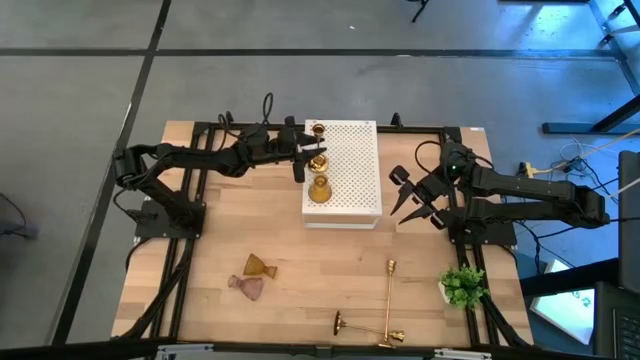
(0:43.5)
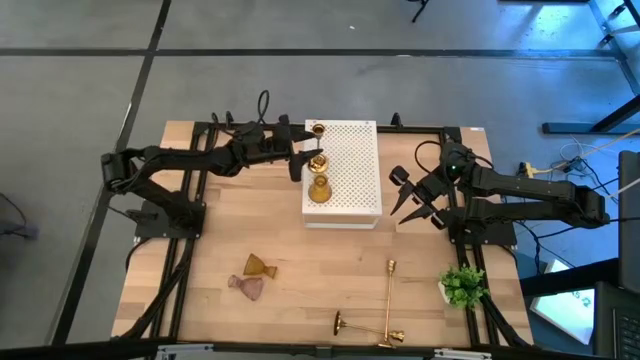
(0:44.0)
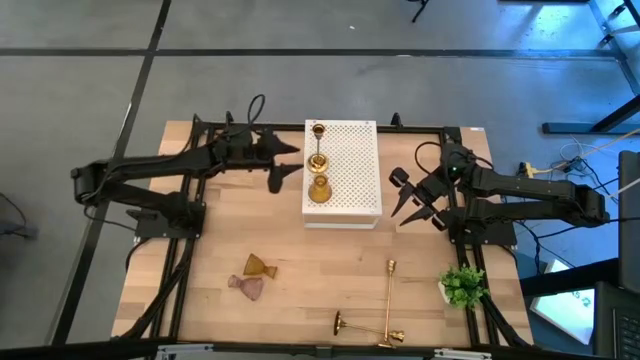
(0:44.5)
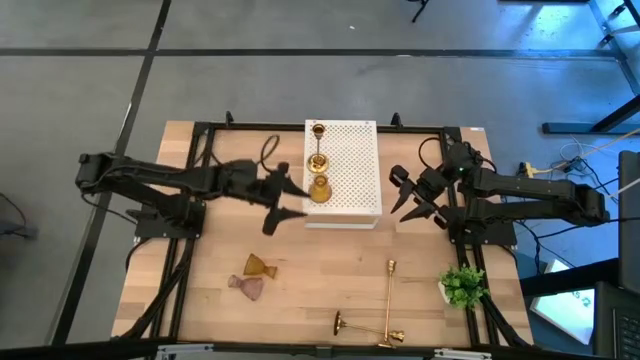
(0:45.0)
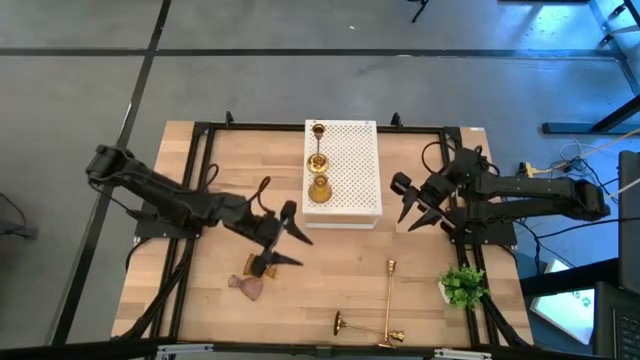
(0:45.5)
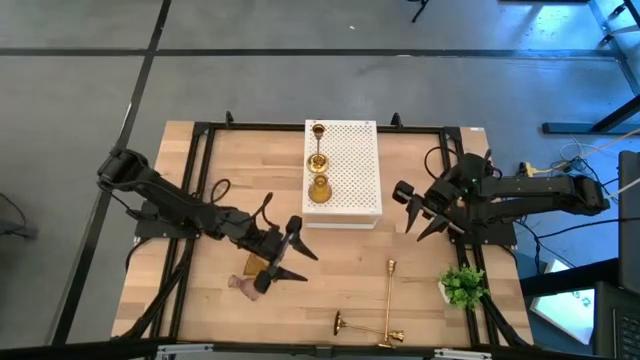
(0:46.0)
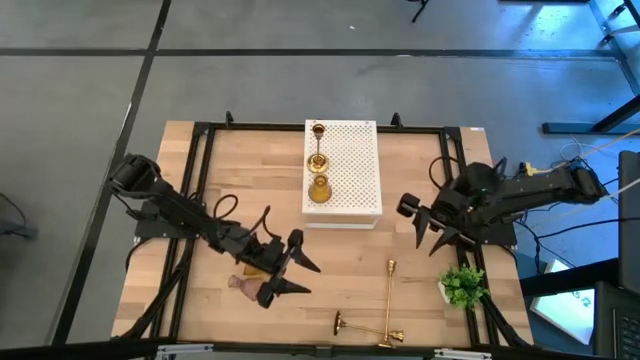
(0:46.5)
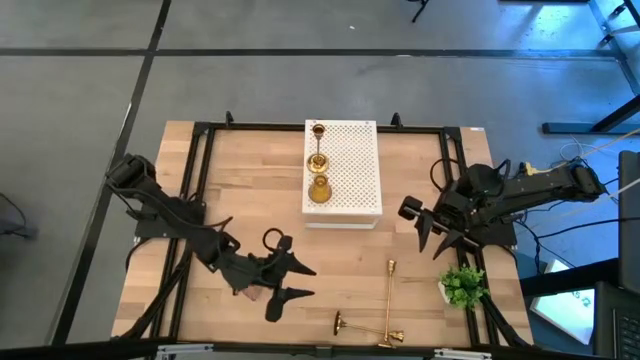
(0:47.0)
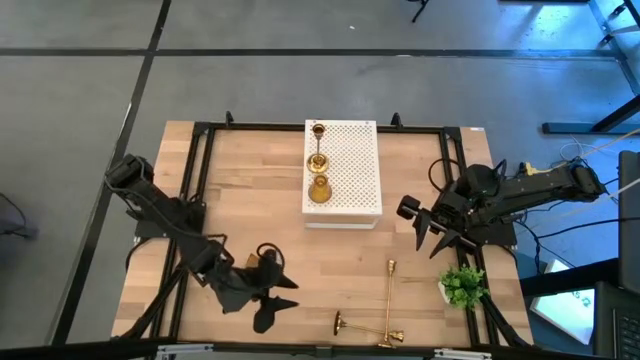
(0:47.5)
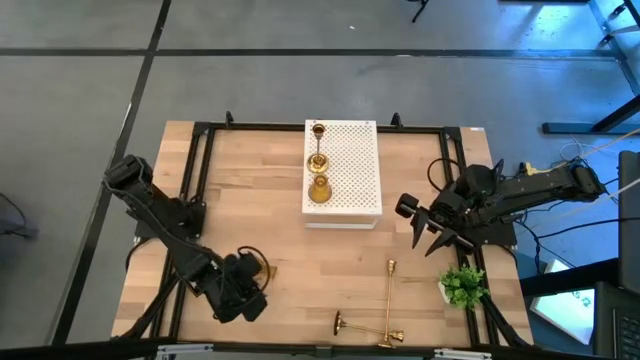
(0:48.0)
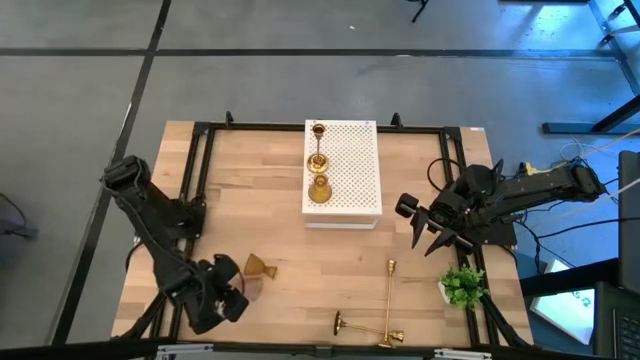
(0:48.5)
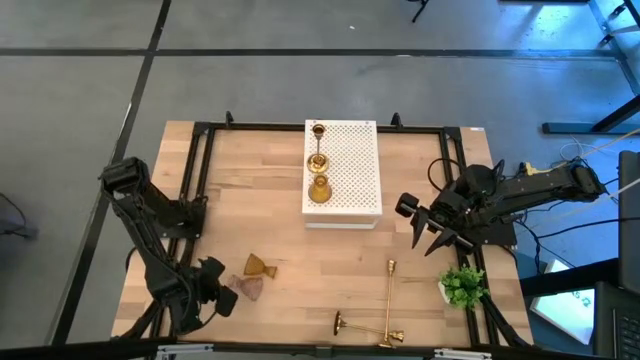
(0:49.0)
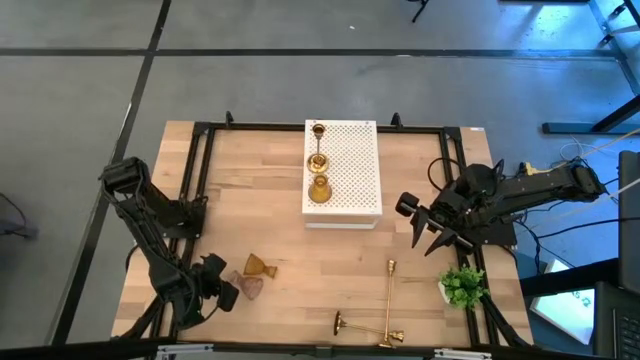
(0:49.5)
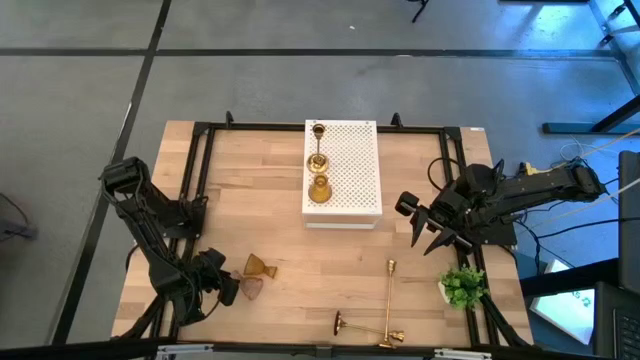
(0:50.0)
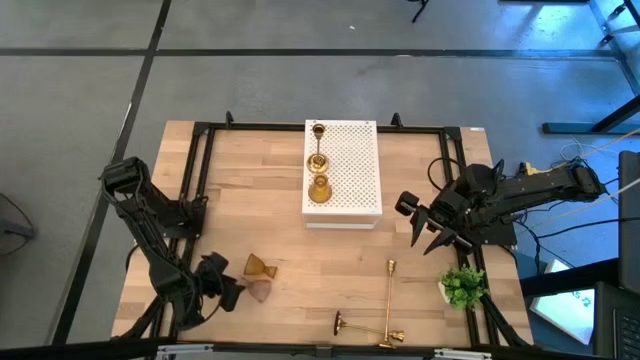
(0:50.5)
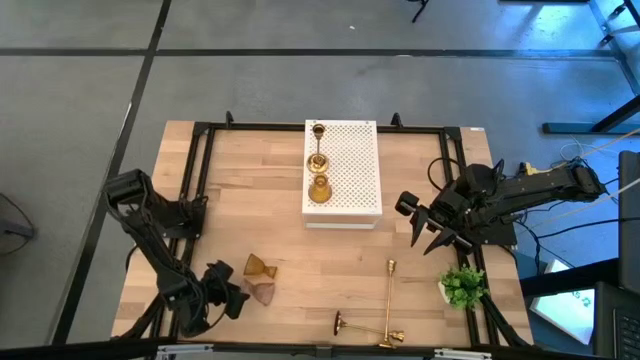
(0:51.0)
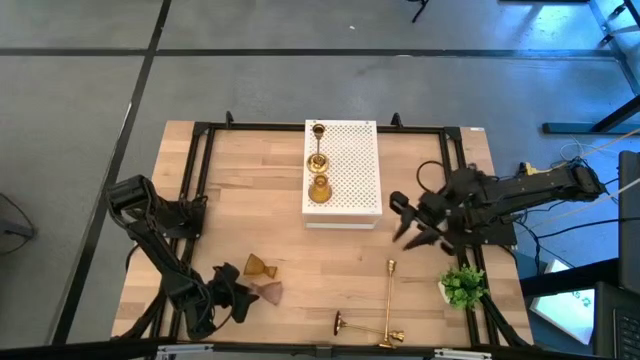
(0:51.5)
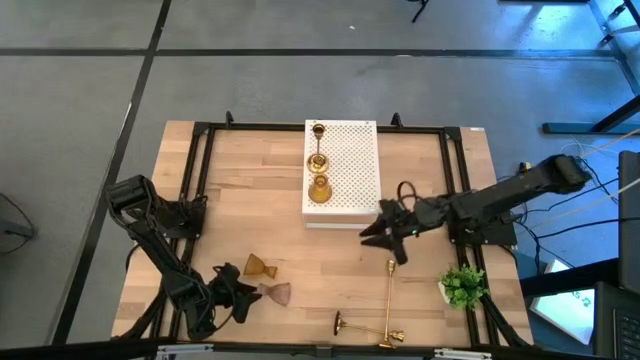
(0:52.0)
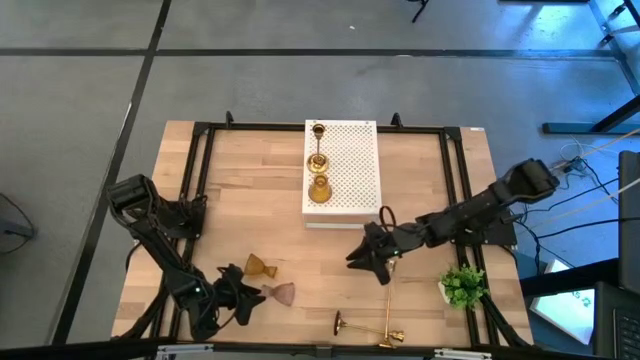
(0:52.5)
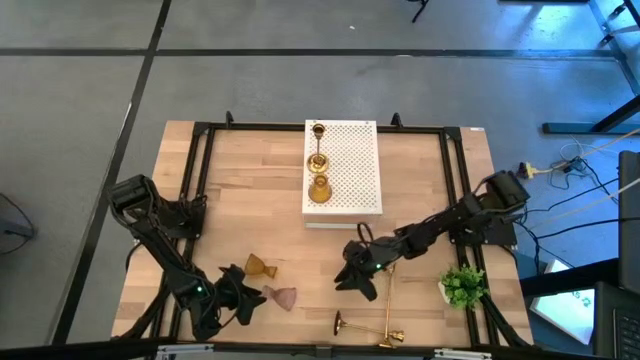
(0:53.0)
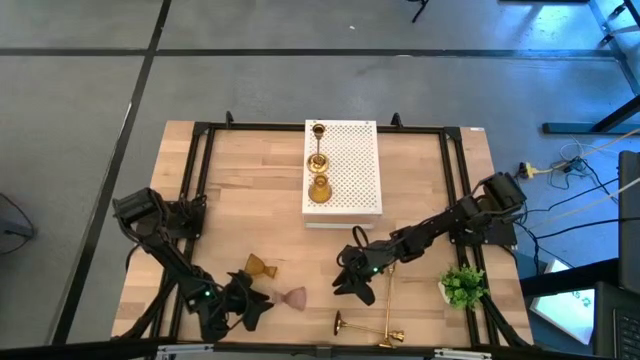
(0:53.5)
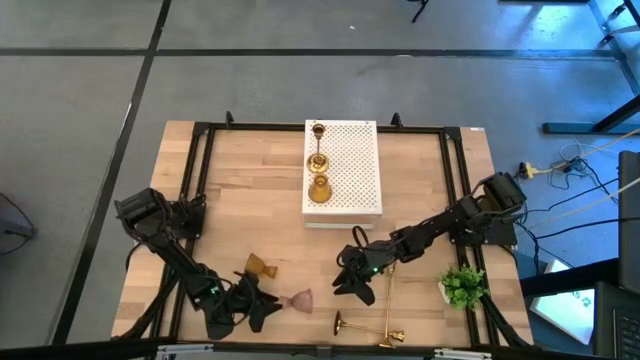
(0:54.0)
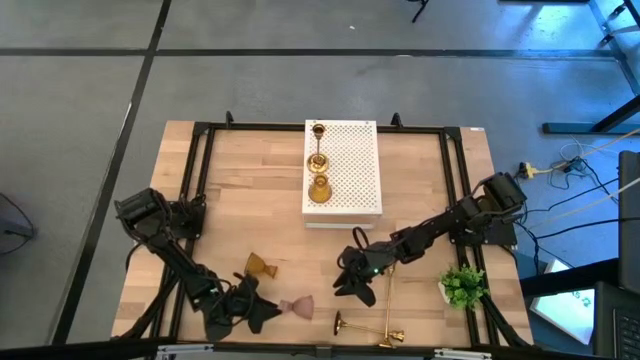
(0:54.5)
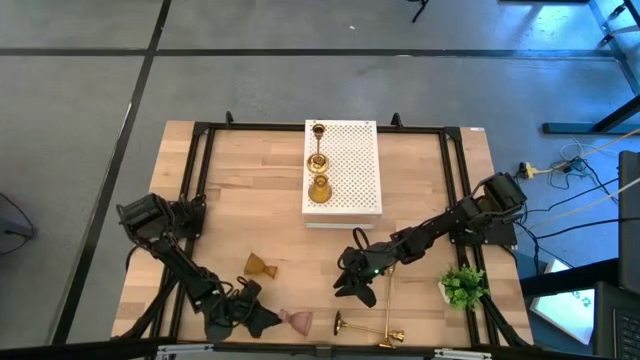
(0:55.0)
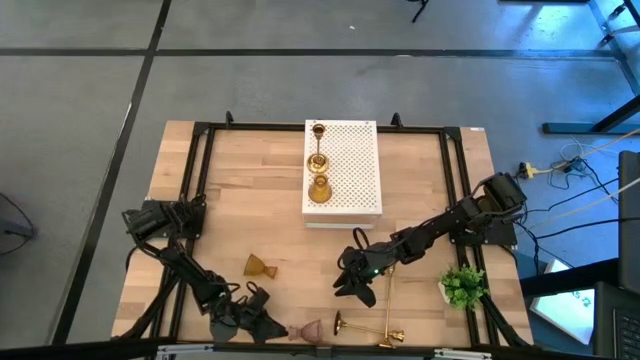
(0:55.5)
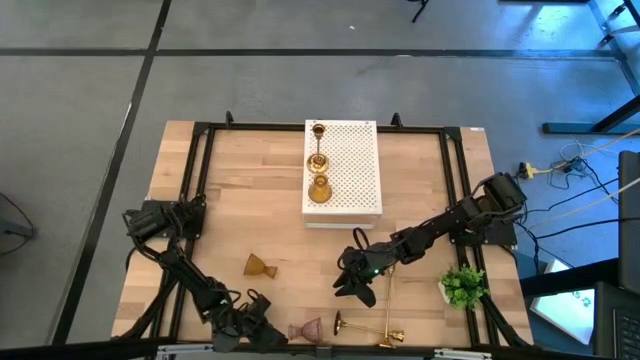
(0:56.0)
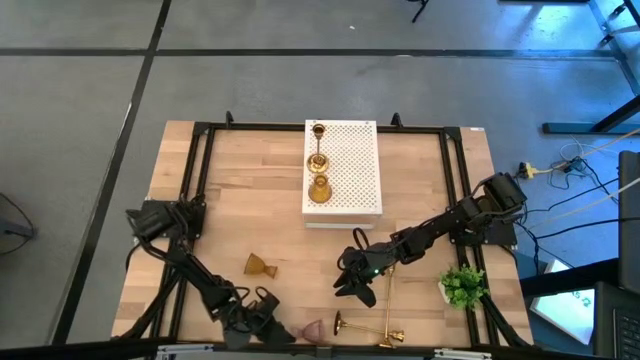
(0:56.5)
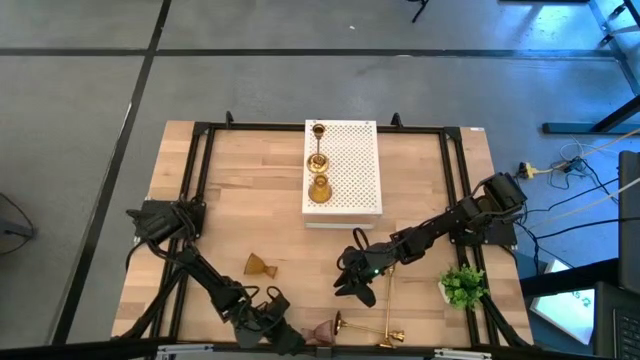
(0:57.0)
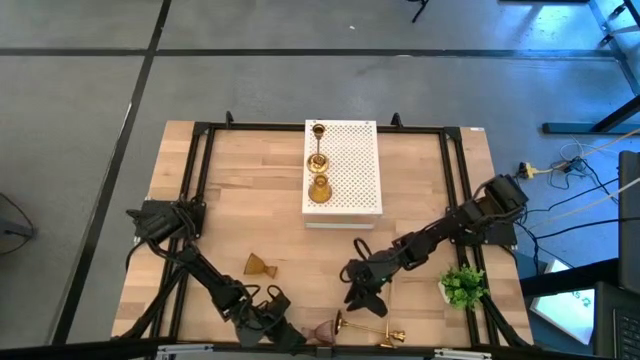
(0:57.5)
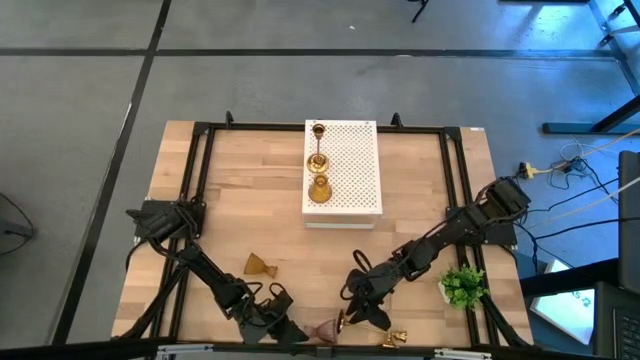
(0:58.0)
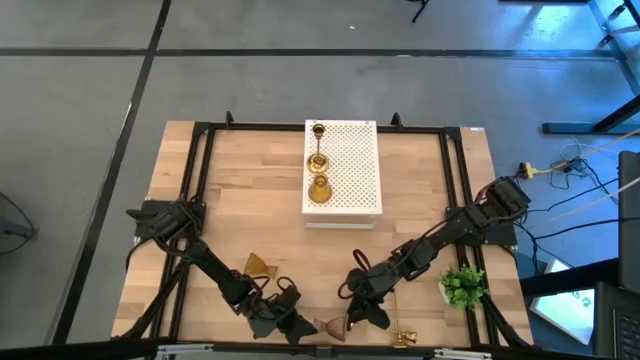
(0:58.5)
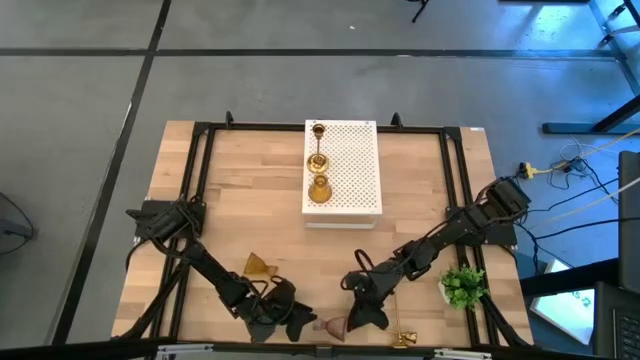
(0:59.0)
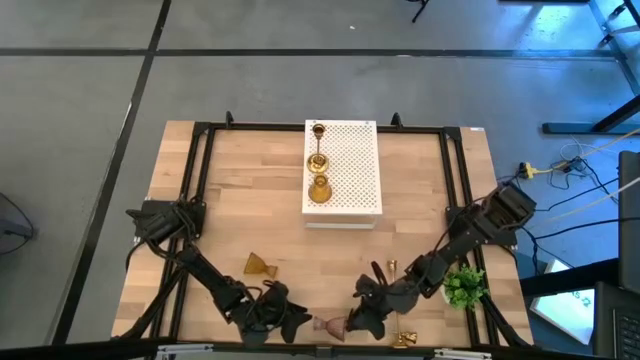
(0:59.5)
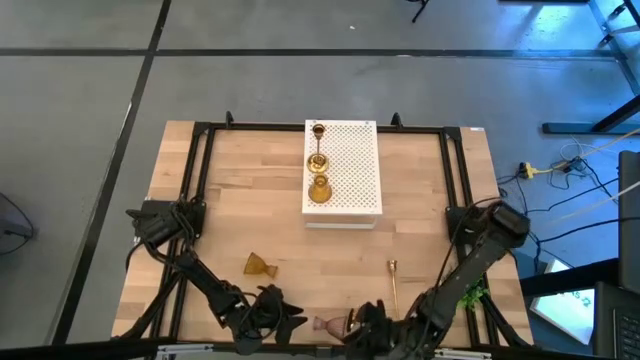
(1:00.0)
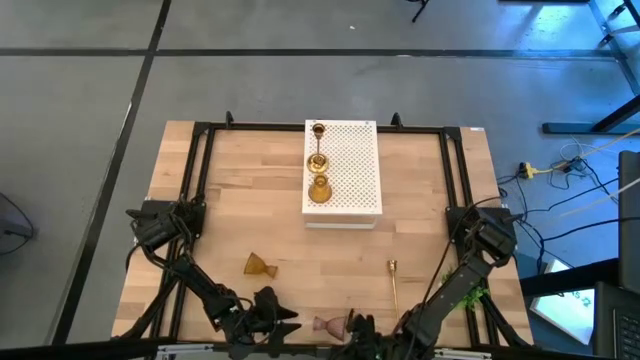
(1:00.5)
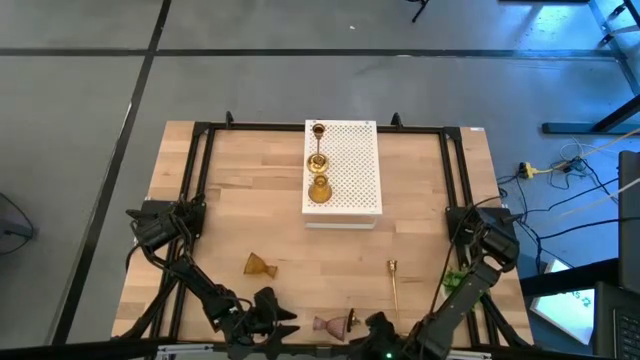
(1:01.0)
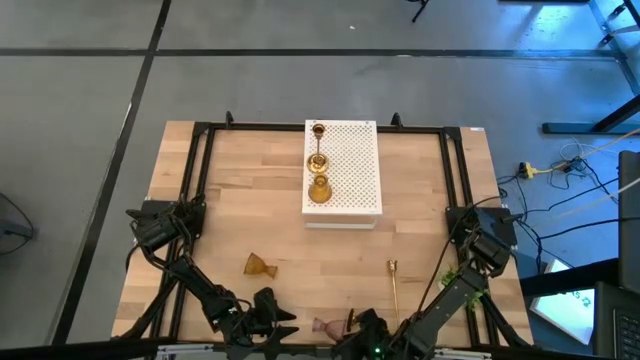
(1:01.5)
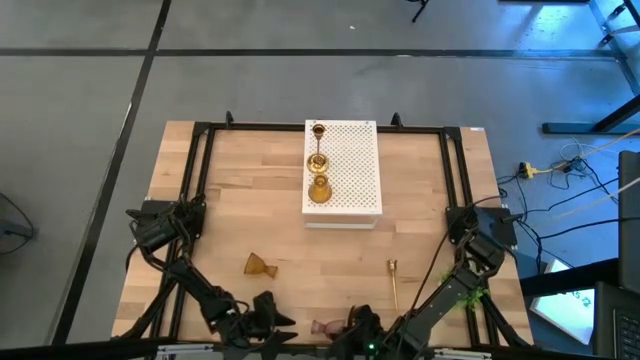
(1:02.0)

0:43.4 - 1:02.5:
Task: Pick & Place candle stick holders
Put the pink candle holder on the shelf

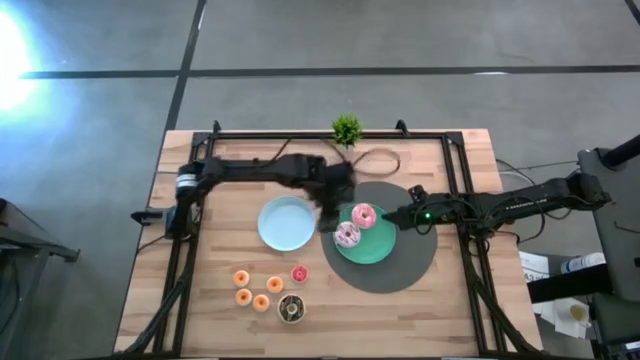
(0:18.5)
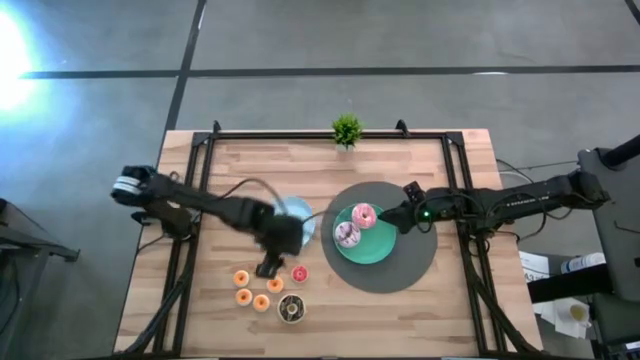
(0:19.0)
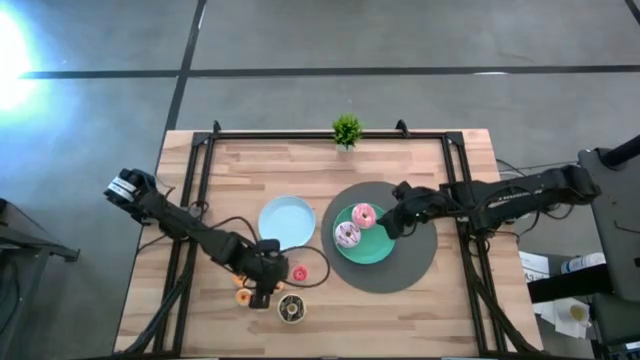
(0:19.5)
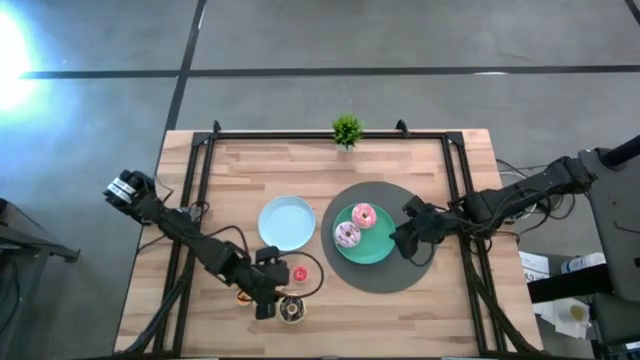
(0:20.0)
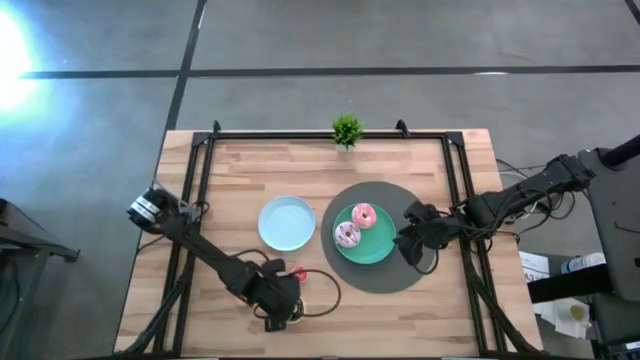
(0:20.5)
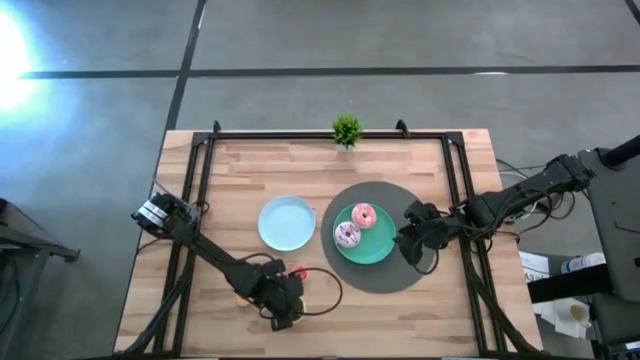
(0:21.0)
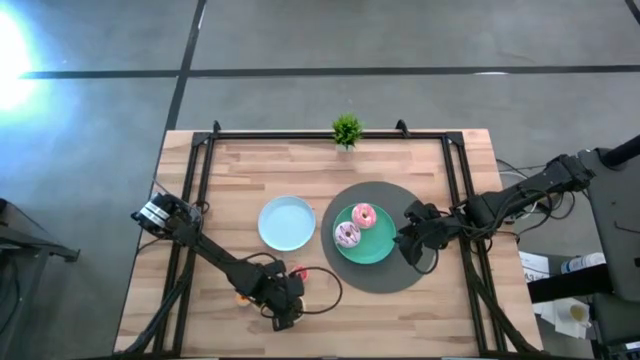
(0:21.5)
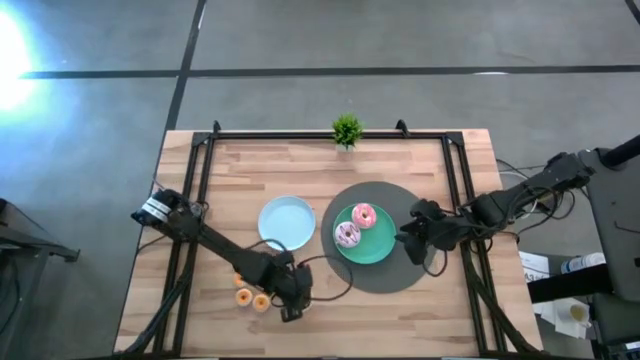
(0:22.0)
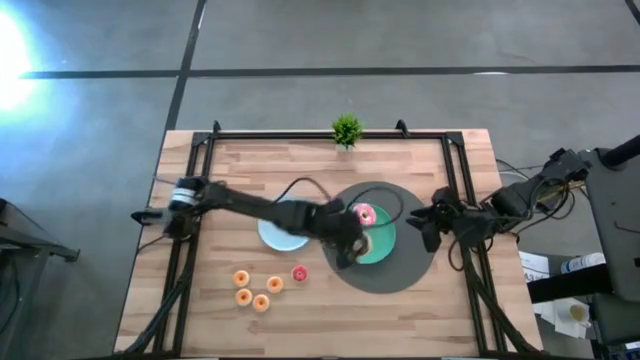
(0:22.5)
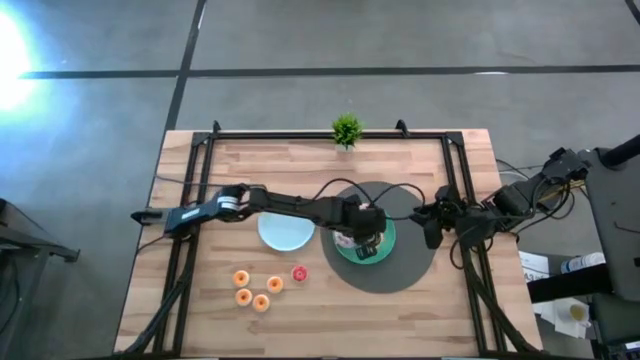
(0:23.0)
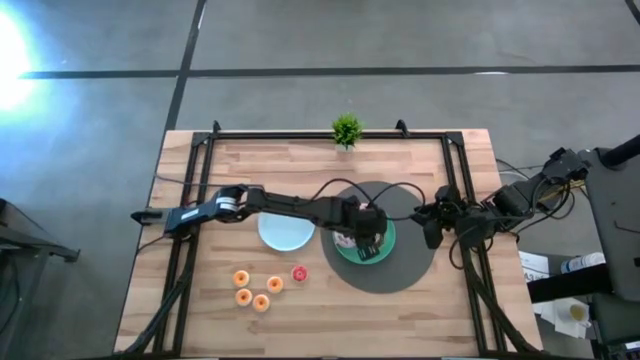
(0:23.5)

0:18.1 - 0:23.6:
Task: Pick & Place donuts
Put the large black donut on the light green plate
